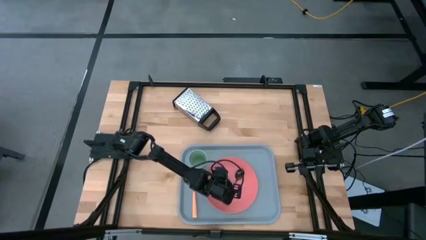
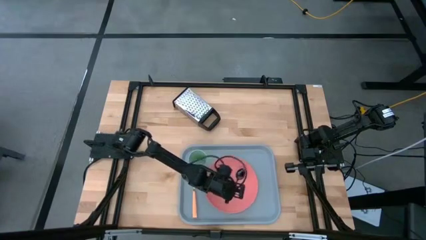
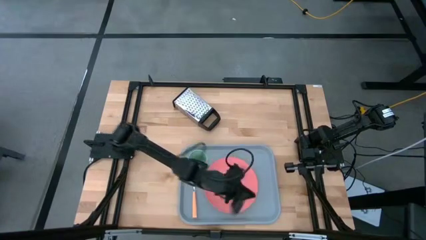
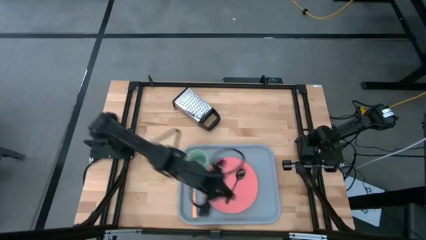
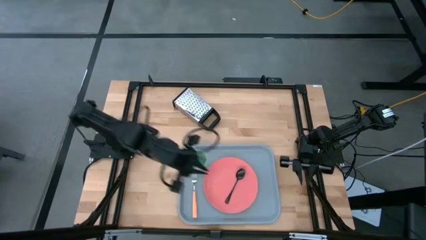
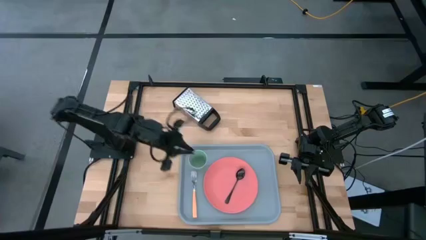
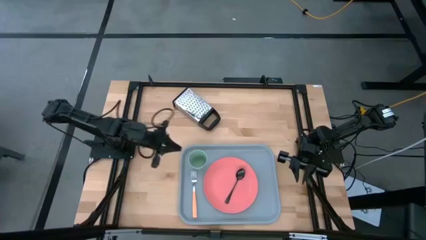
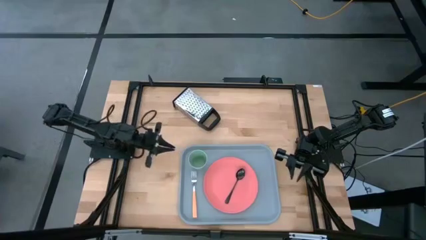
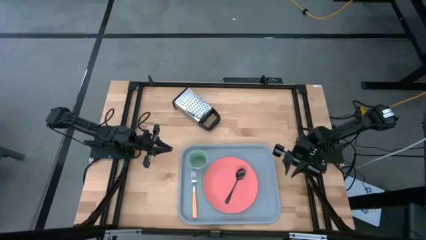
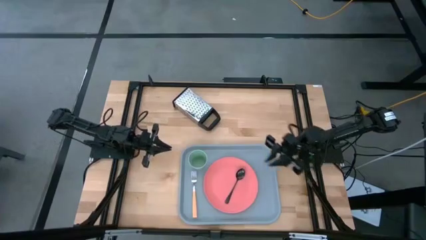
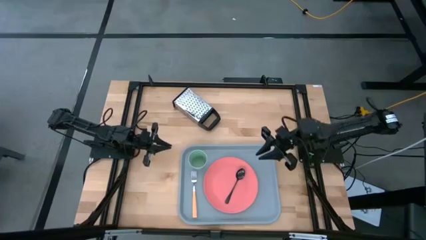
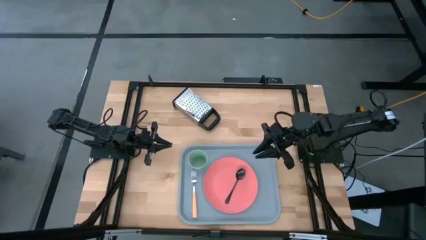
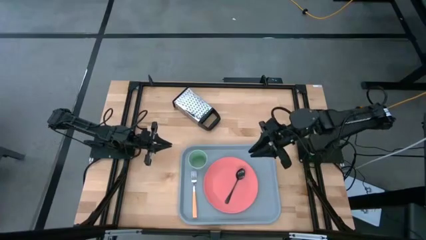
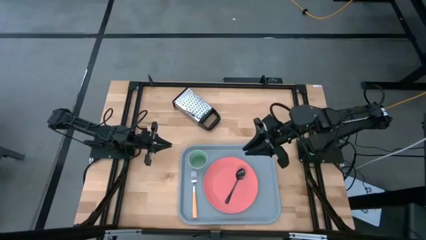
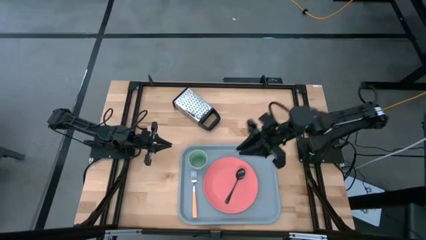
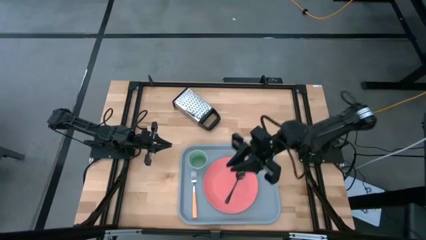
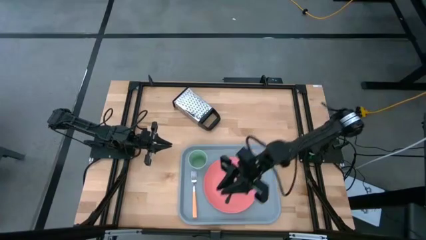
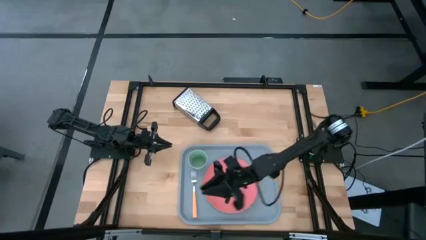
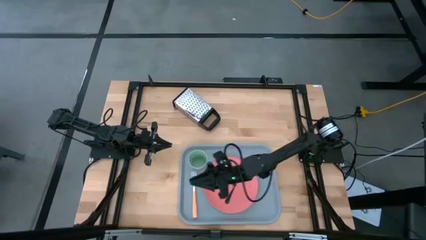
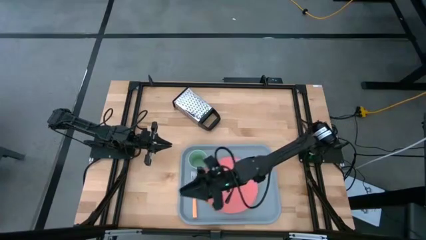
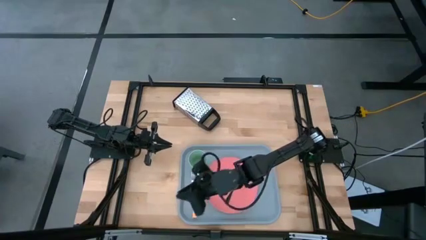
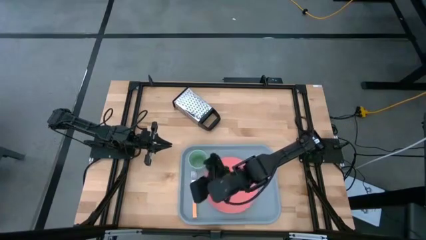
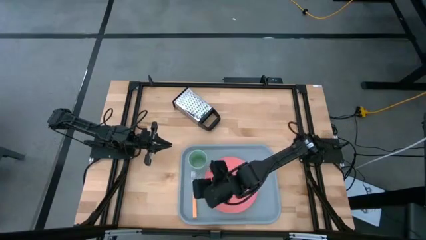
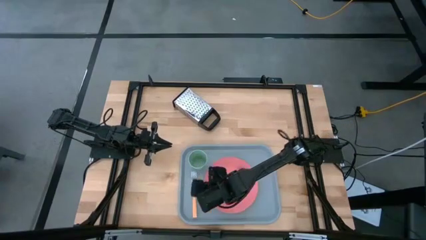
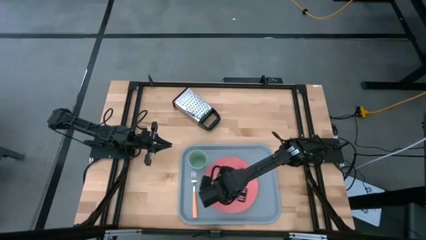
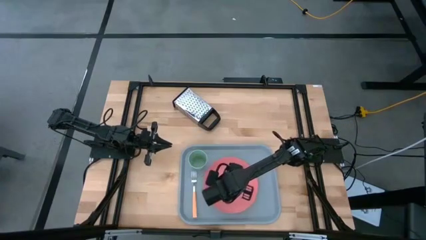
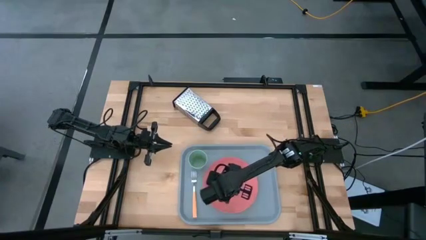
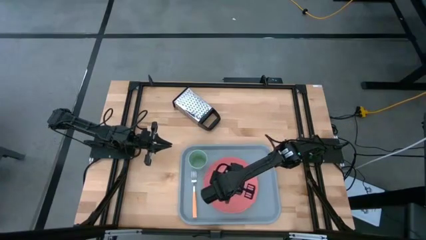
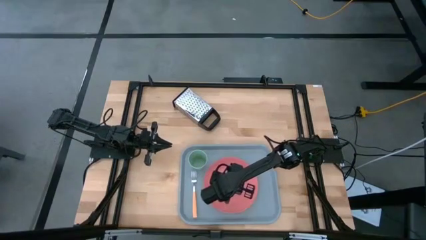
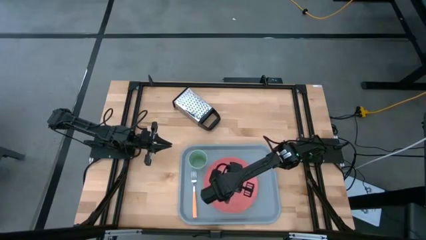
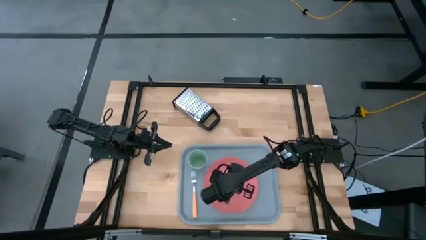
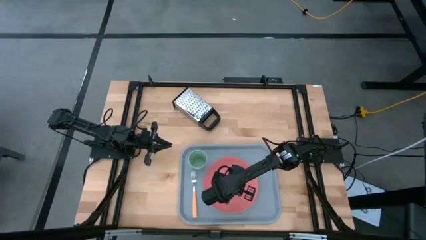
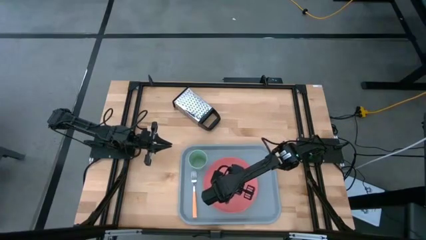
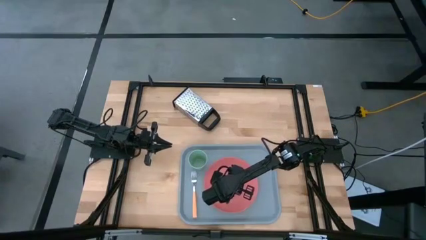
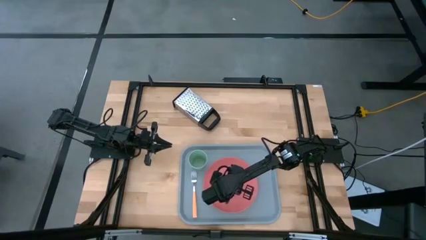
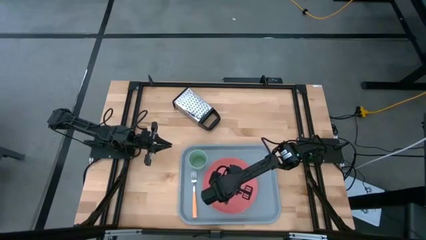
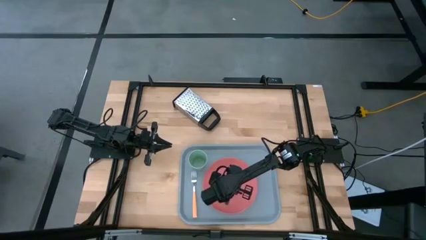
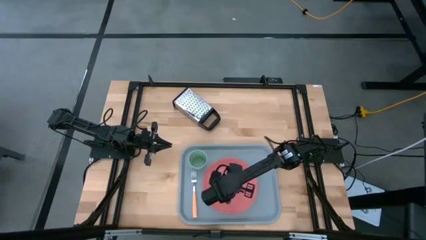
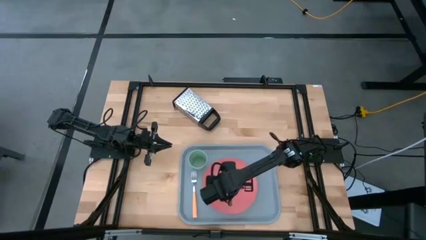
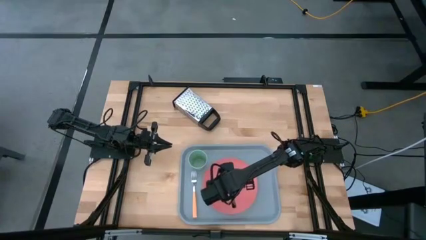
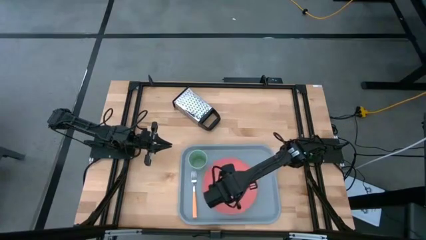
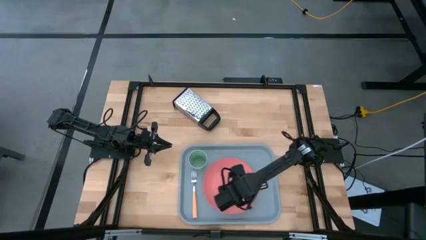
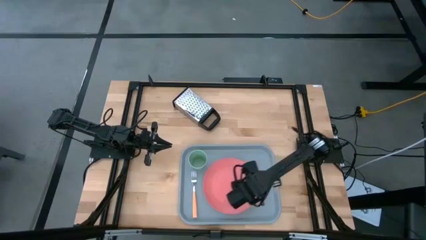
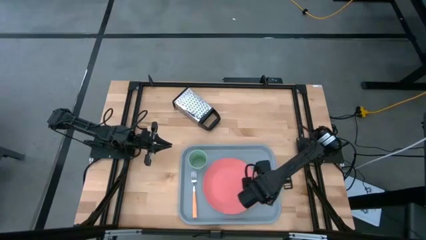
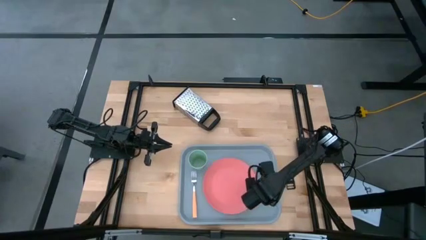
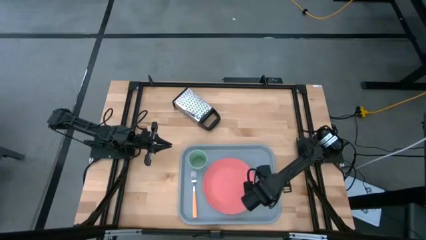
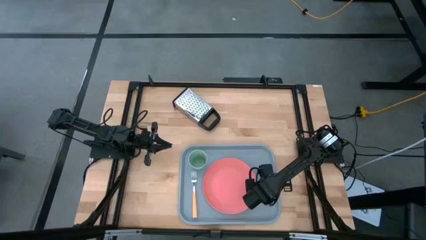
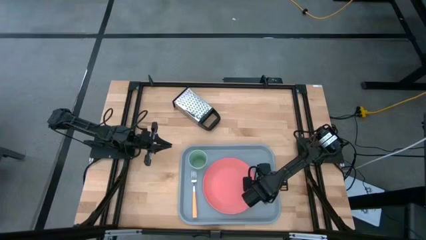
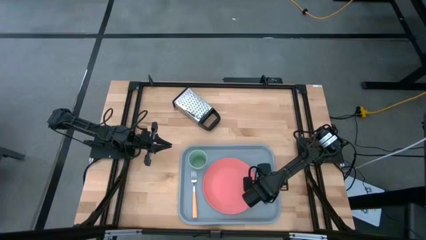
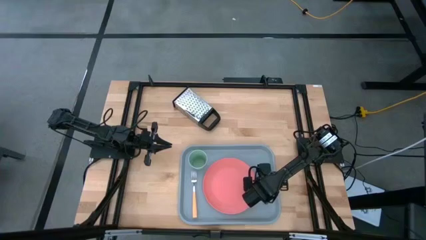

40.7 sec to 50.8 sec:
Task: Pick and place plate/cup/fork/spoon on tray
Put the spoon on the serving tray to the right of the plate

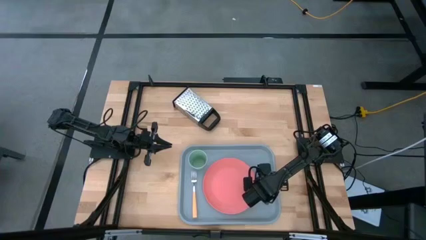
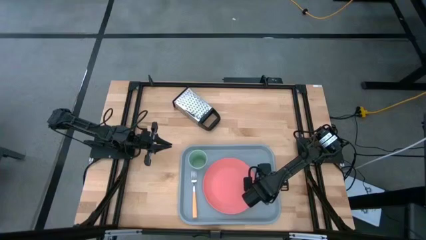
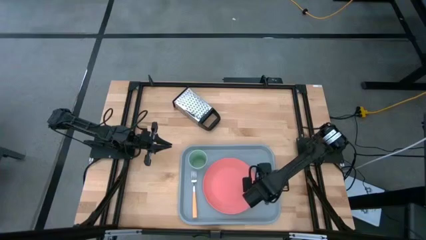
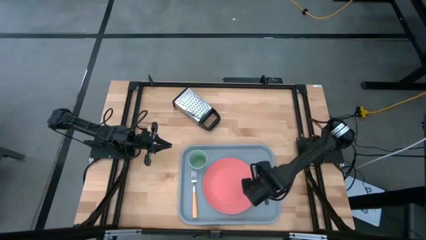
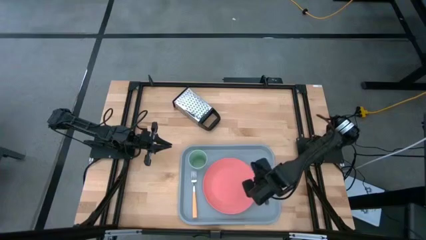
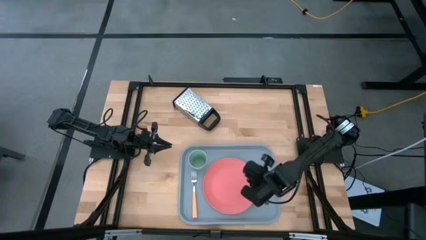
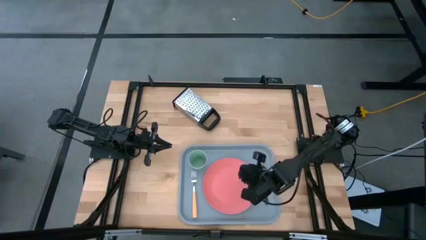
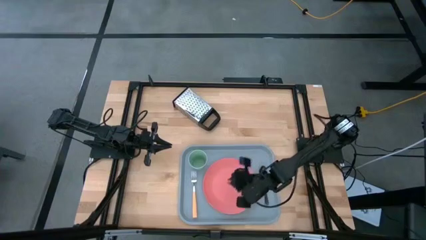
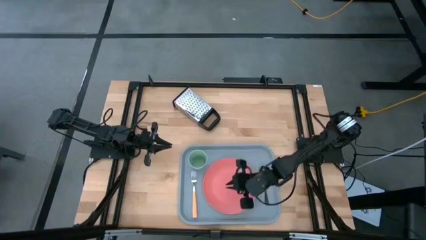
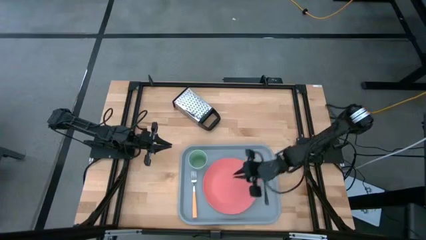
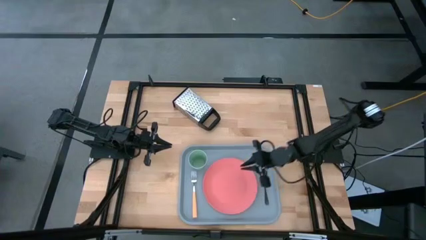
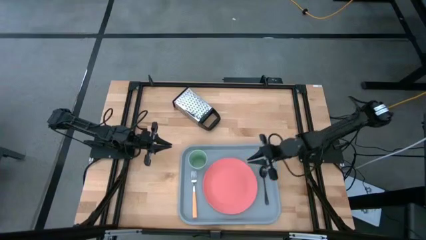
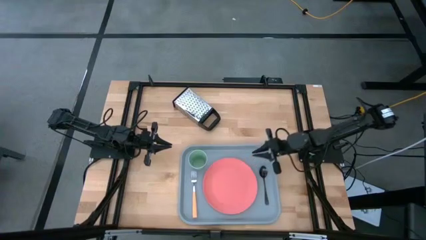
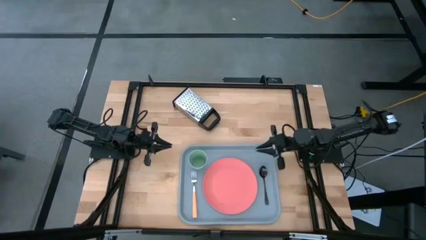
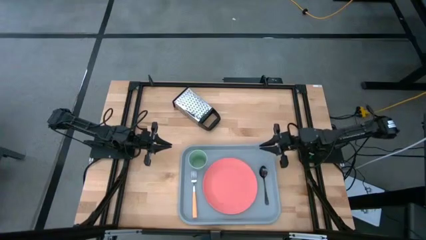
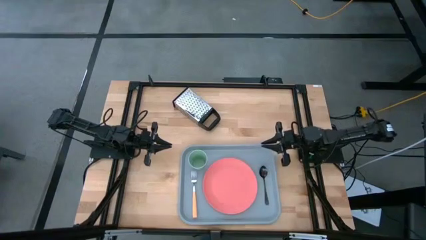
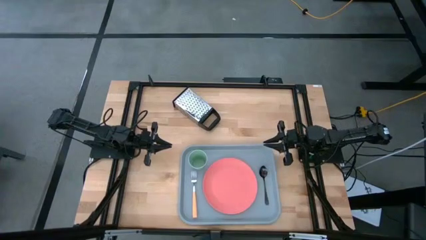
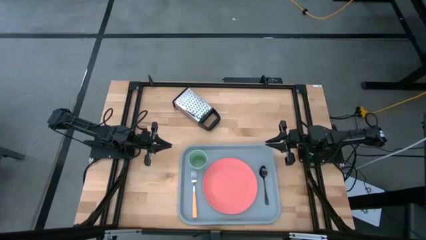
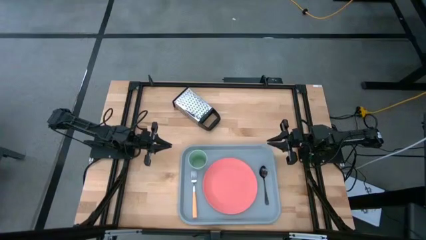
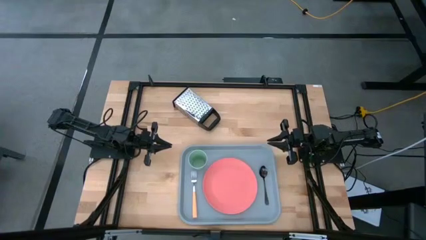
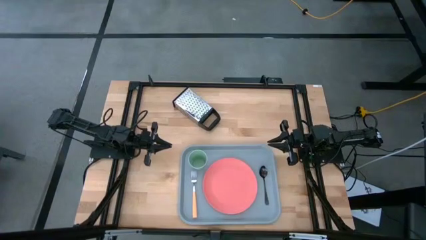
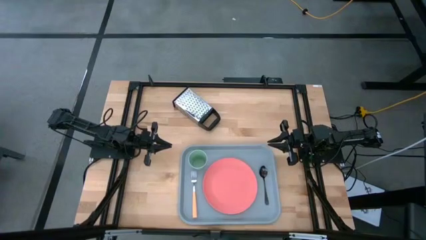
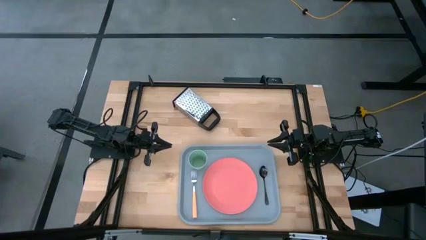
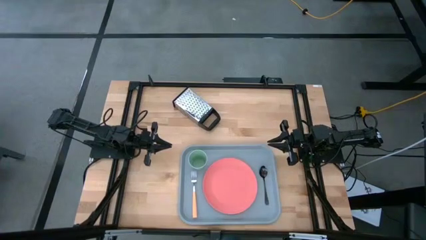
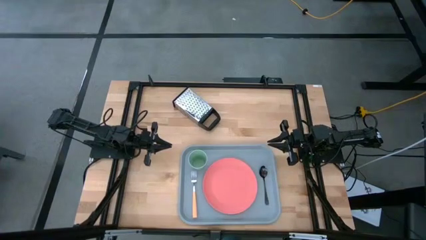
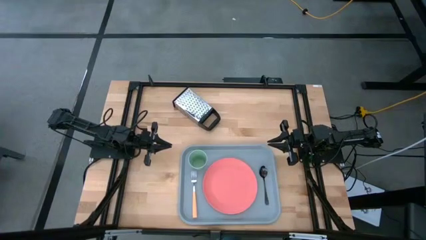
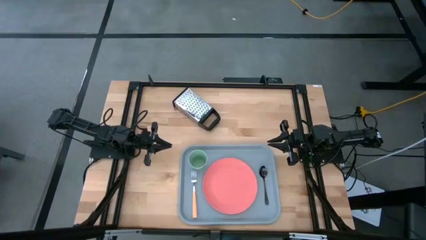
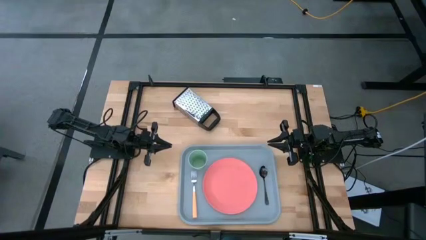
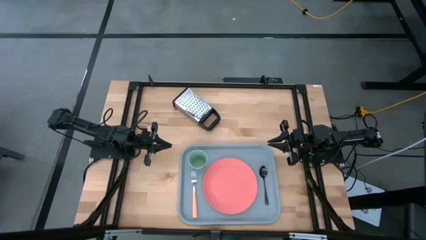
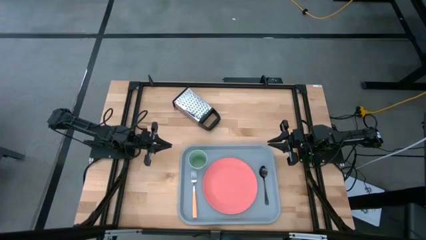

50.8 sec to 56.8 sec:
Return to Home Position

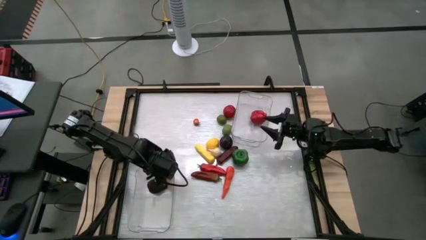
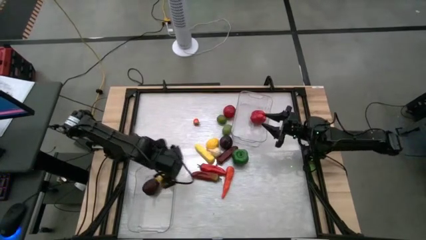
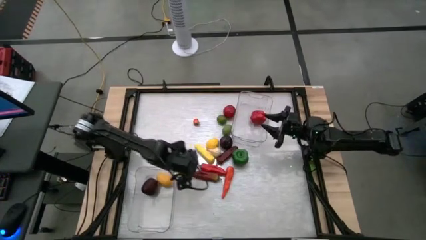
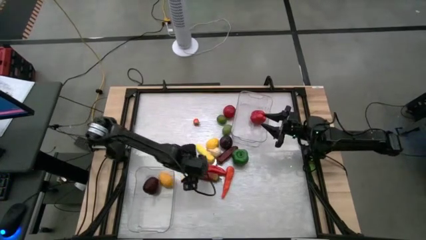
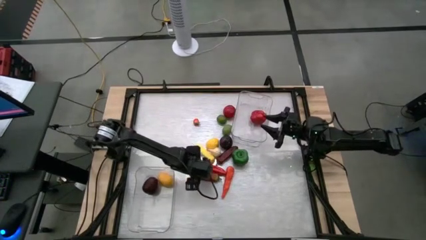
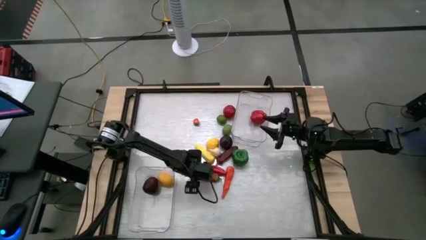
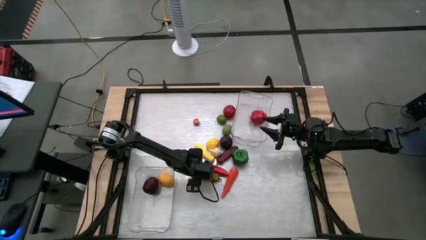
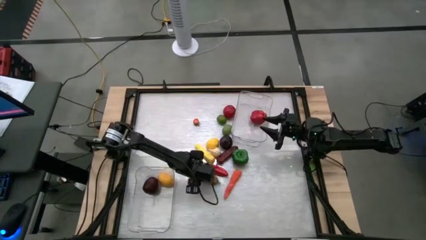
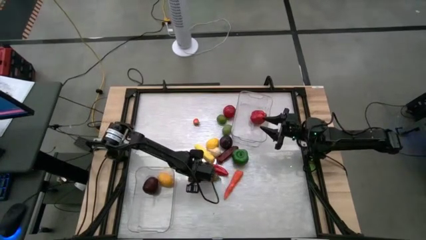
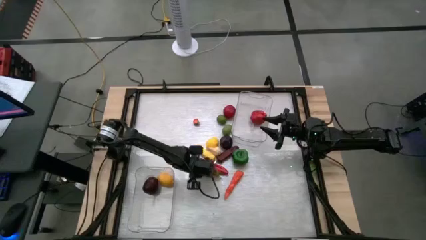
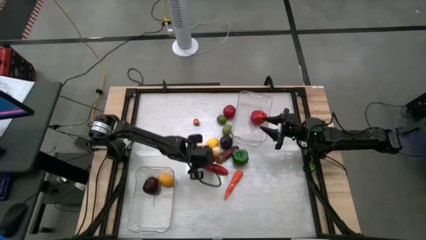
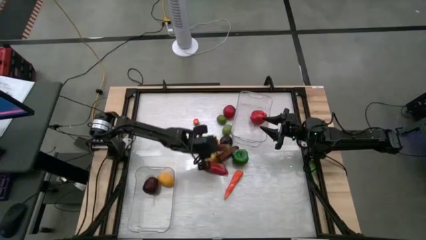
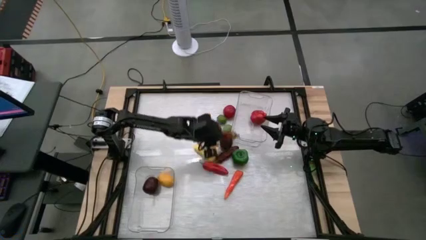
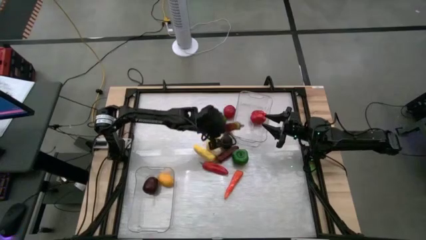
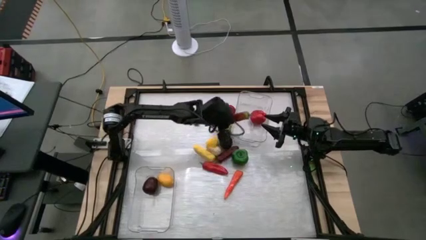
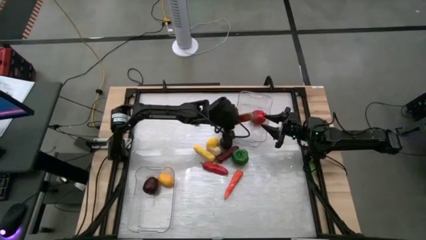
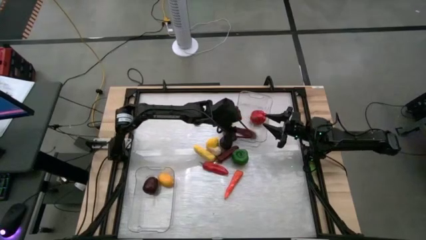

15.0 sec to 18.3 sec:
Task: Sort produce into baskets
Put the bottom dark red chili pepper into the top transparent bin
